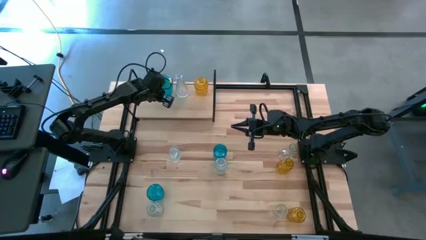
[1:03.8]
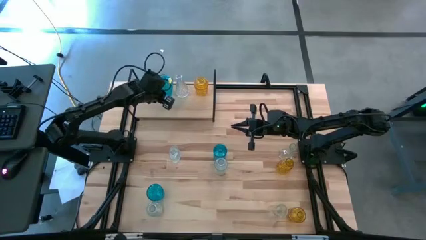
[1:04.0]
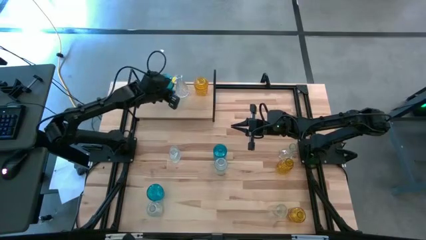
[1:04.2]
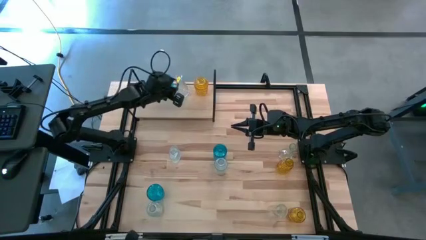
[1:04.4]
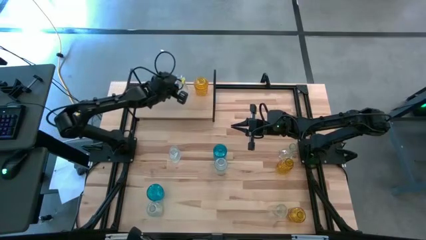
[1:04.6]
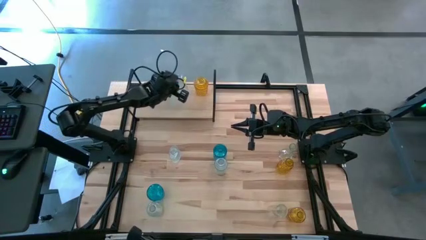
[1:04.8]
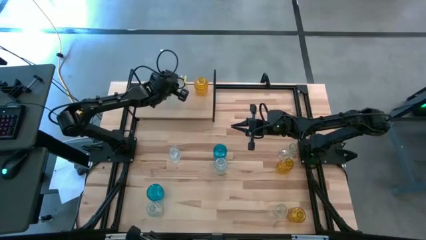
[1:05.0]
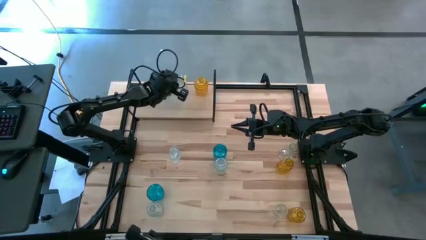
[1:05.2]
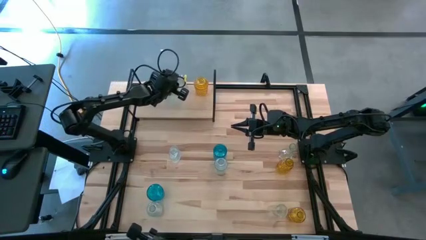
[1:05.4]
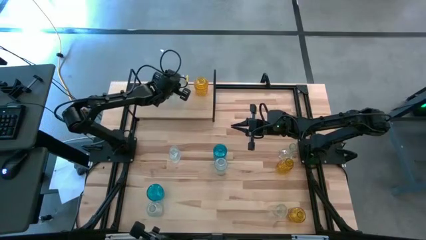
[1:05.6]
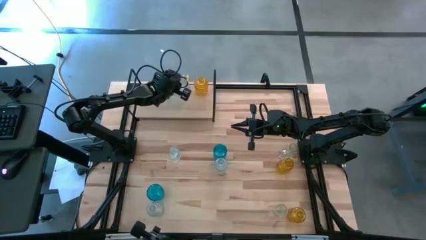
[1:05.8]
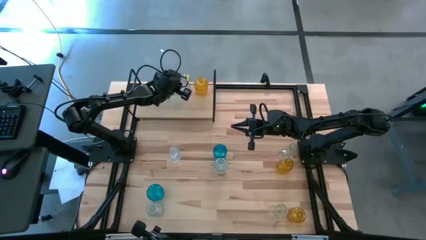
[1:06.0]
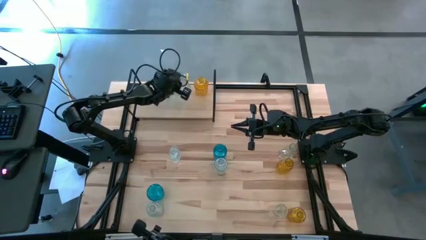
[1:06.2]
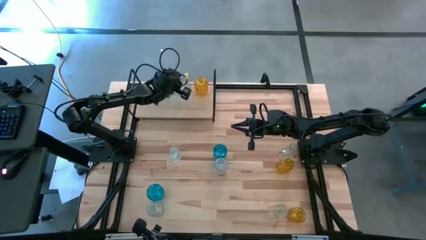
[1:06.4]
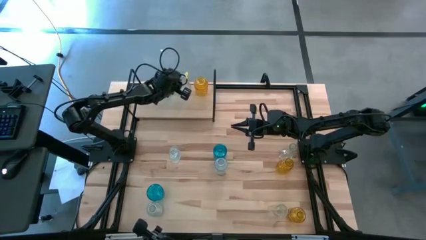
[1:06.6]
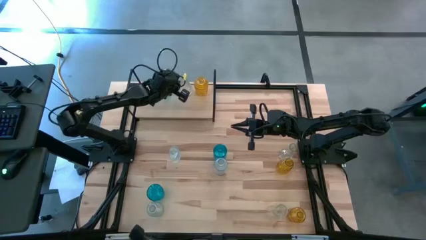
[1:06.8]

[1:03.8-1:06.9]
Task: sort vases onto shelf
Adjust the transparent vase on the shelf

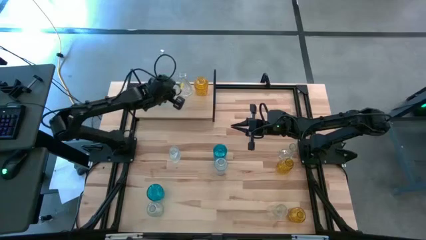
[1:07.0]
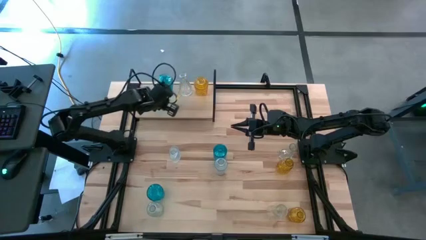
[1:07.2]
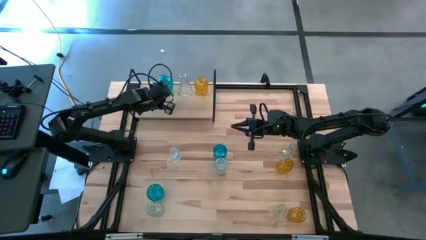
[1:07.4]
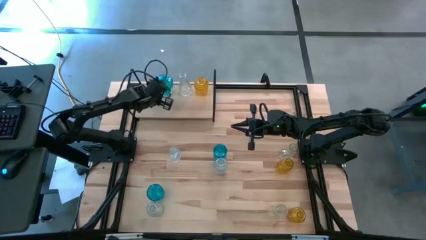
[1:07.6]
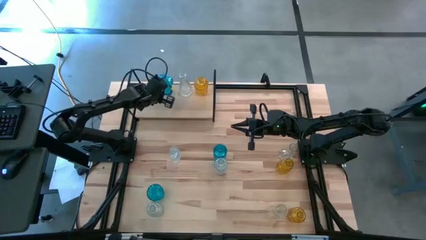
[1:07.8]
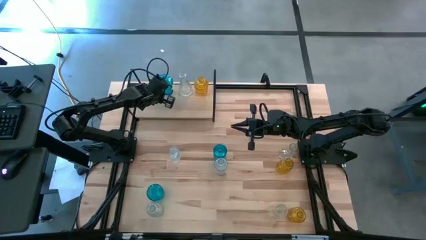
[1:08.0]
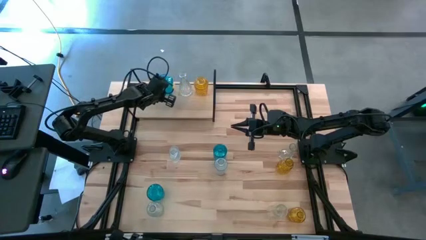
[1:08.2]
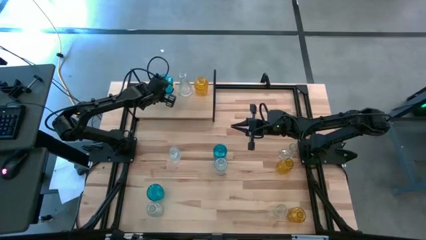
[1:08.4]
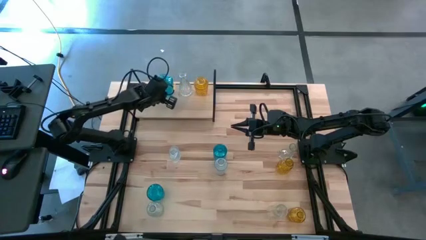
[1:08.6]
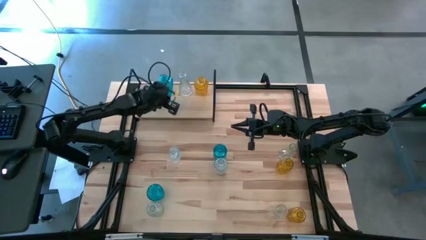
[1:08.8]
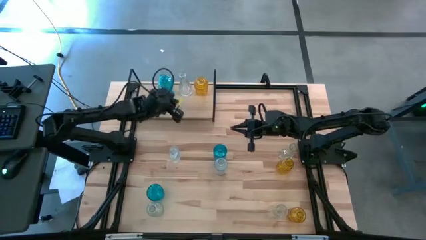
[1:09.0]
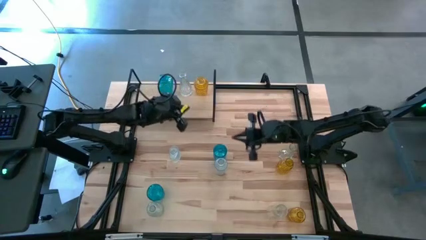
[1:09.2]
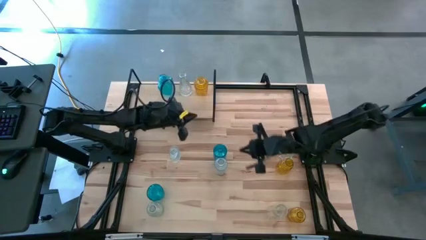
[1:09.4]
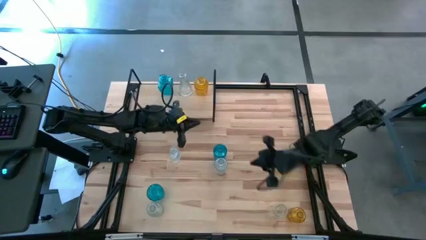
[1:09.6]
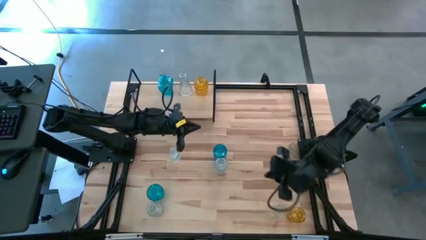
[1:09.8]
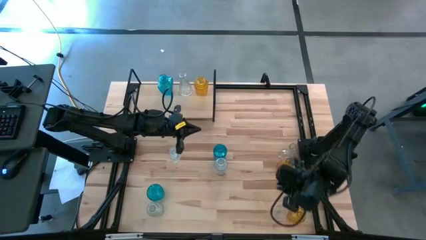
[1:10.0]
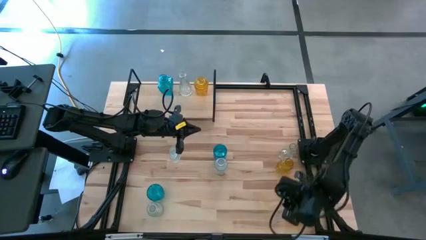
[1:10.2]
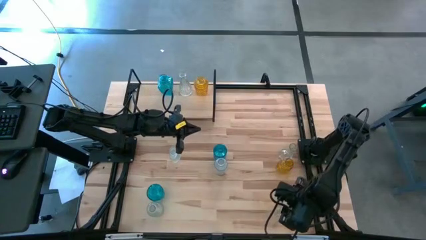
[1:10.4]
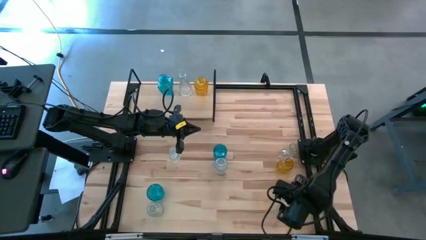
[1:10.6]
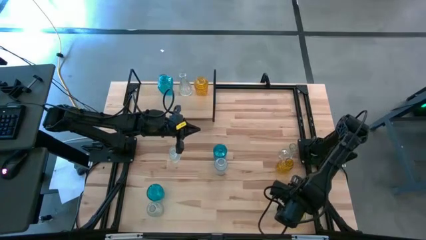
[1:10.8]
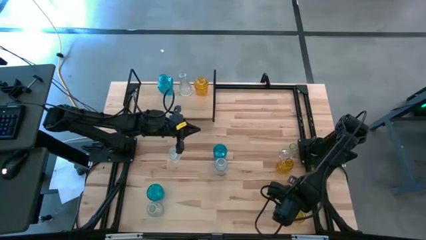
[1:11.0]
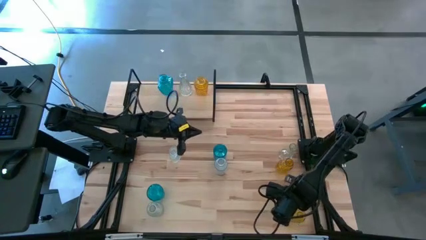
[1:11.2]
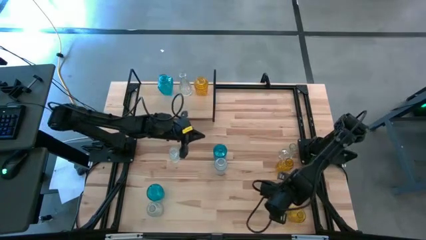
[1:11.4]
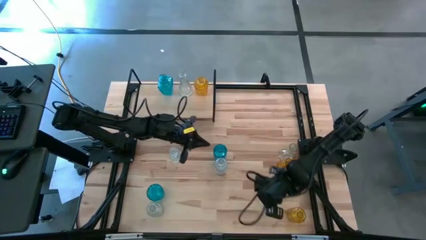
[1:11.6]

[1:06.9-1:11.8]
Put the transparent vase on the shelf

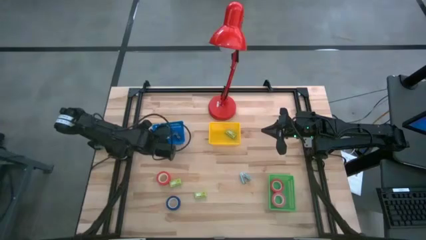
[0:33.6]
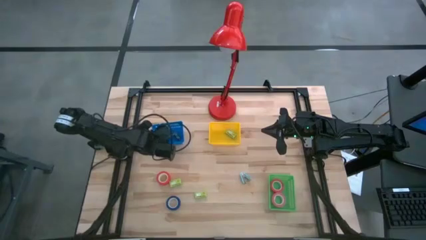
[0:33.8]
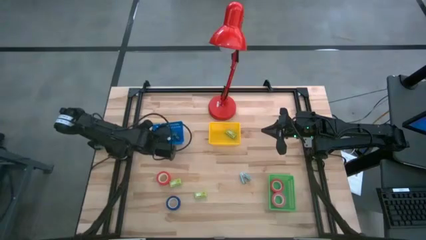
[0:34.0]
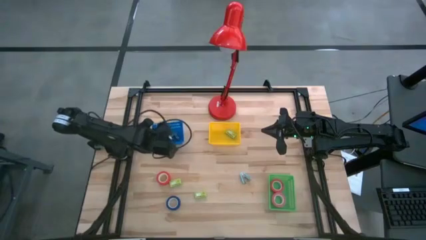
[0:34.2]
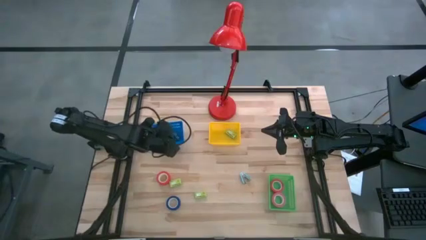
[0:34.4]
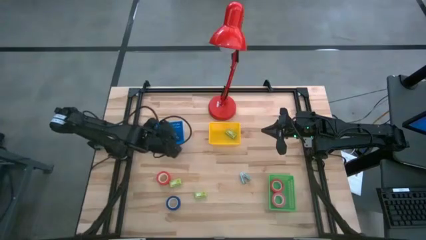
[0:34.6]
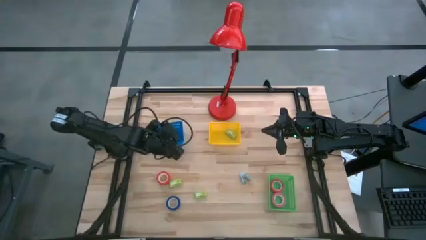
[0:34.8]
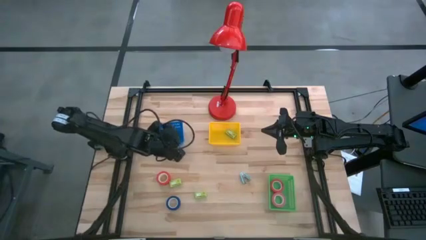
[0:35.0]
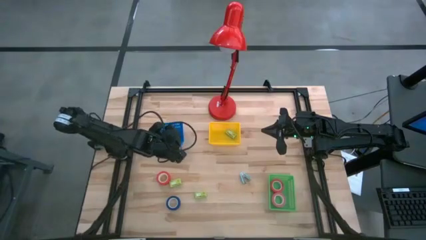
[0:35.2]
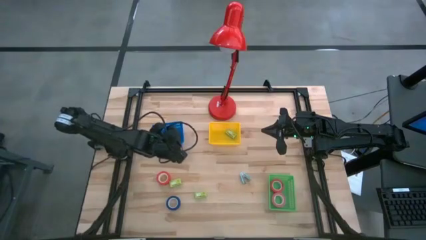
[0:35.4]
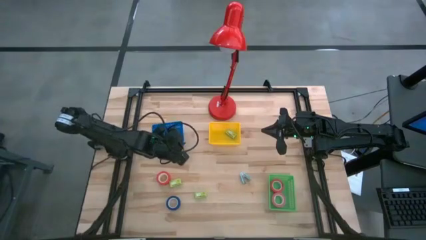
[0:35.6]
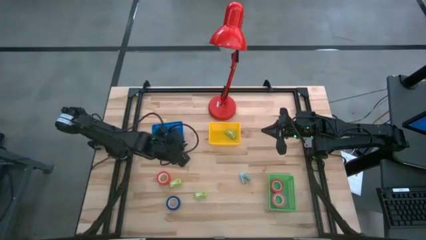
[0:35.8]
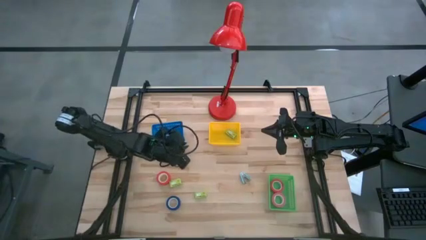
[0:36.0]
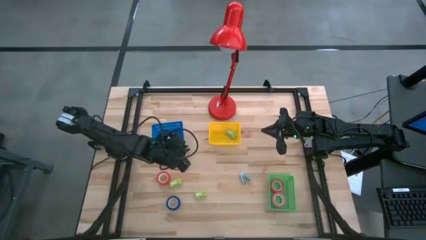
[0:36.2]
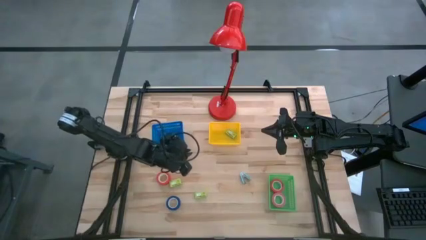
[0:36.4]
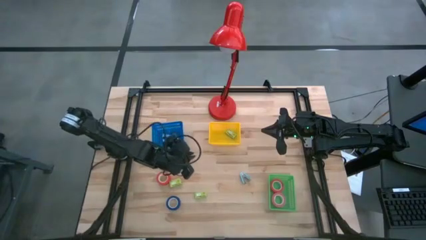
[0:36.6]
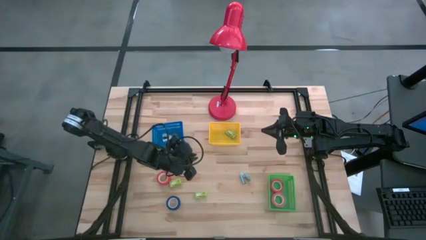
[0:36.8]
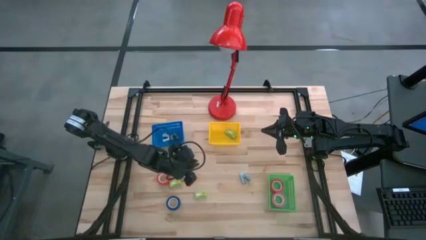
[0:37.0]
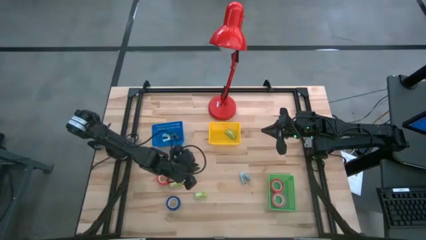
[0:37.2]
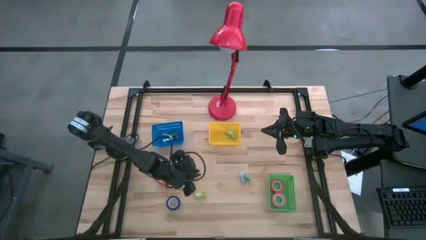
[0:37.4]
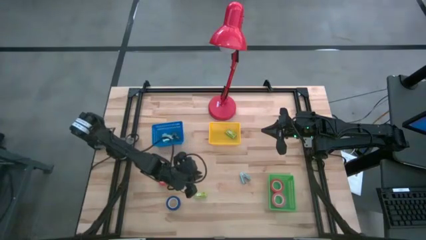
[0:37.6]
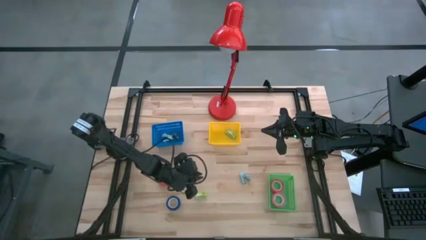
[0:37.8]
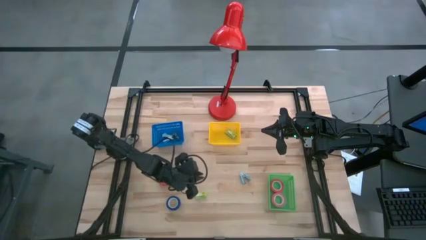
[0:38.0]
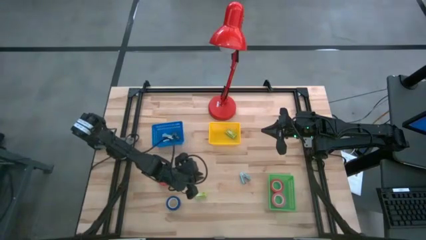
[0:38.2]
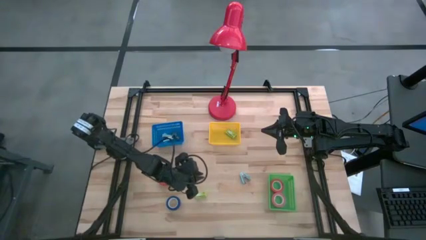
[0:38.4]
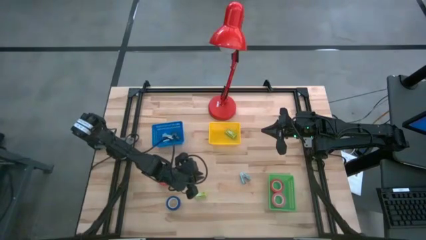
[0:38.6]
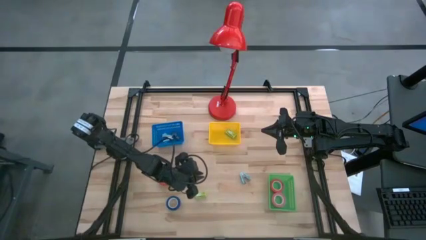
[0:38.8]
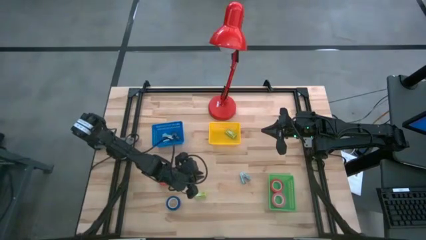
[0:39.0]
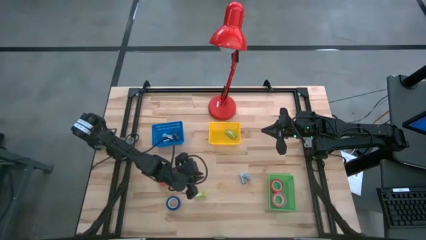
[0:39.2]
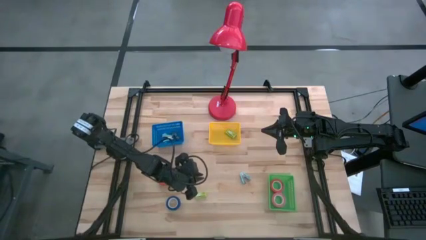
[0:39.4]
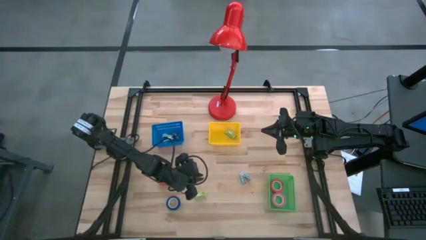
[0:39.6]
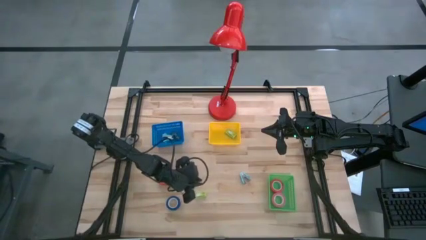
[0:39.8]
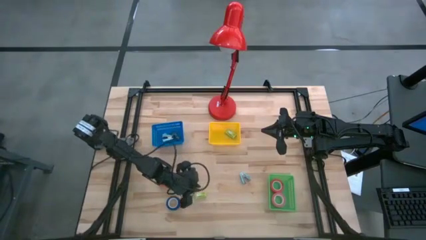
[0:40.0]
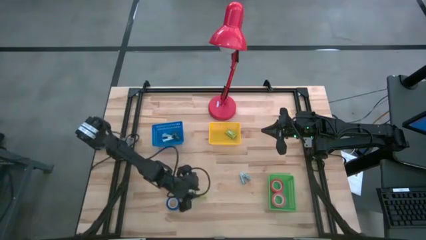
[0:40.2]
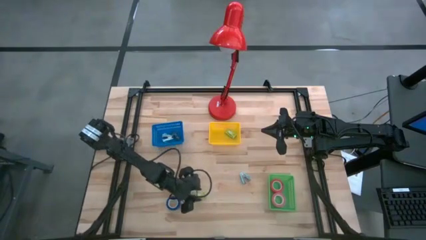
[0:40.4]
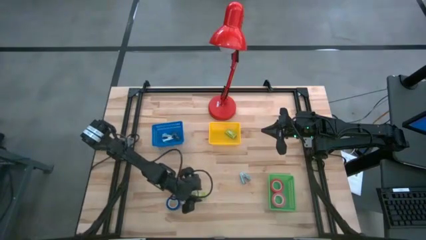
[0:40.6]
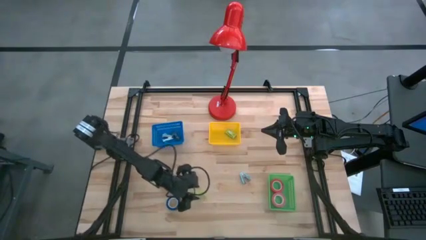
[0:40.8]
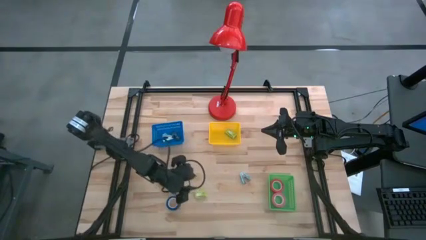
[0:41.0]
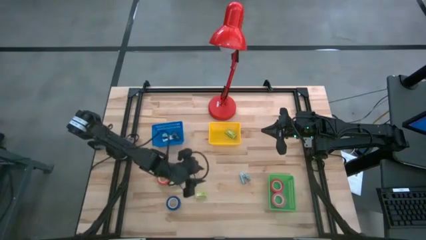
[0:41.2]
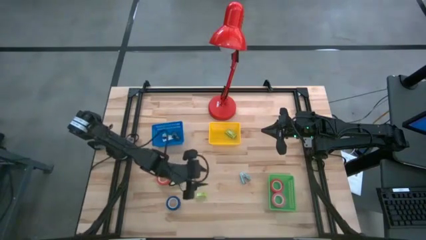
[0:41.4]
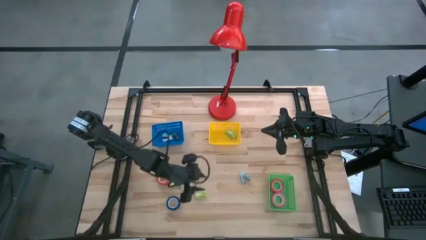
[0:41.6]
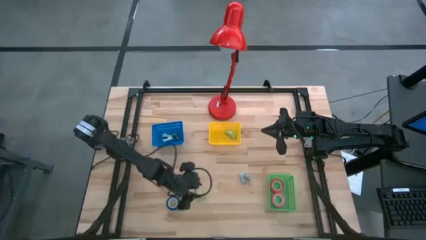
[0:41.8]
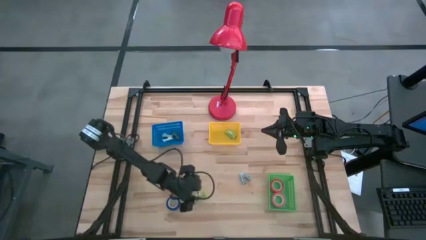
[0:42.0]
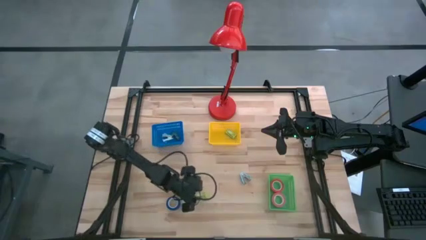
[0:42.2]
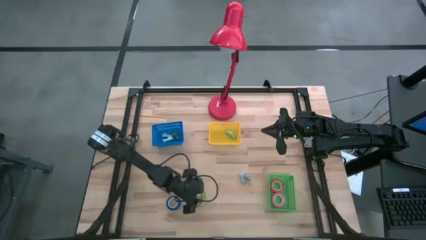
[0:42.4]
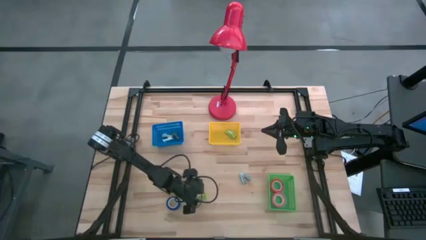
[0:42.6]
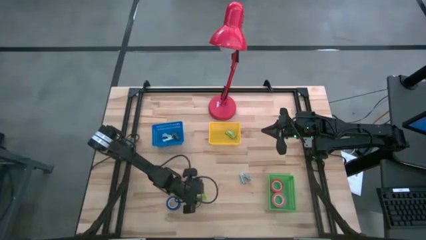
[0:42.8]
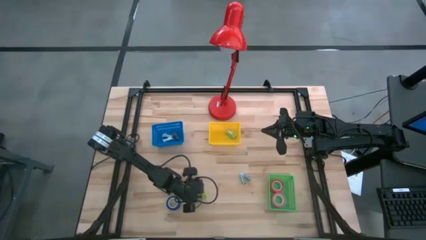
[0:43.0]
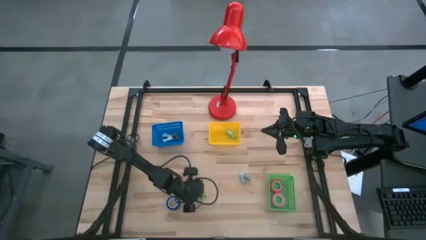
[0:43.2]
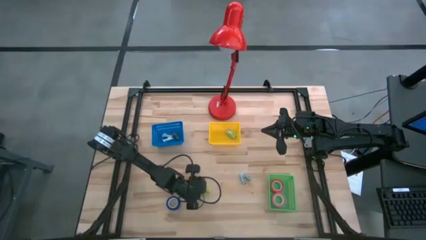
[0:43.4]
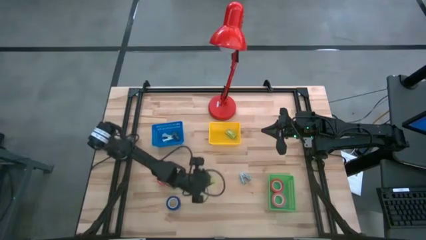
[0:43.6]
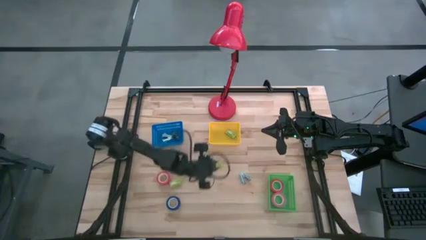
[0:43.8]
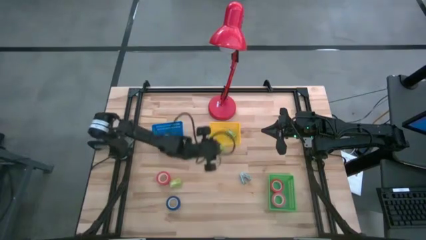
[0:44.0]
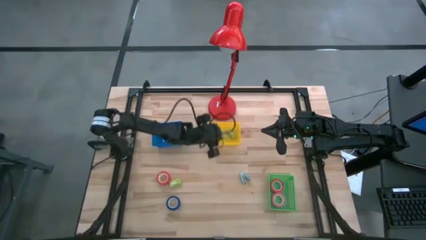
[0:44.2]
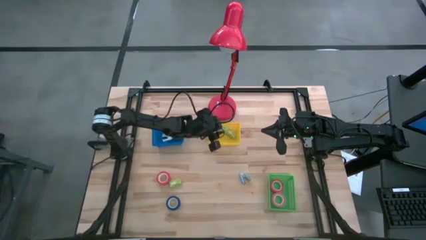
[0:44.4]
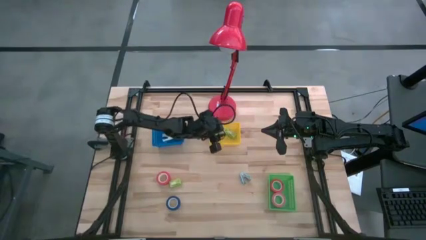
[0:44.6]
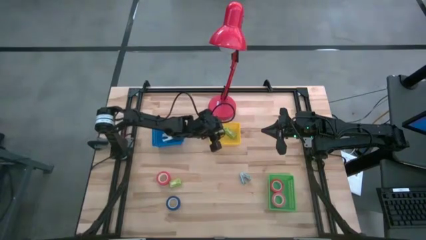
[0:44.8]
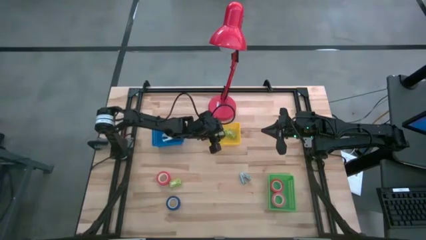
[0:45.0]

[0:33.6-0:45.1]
Task: Pick and place Stapler, Stapler remover, tape
Put the bottom green stapler box into the yellow bin
